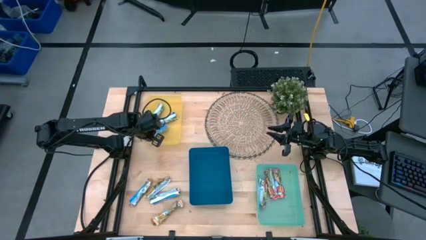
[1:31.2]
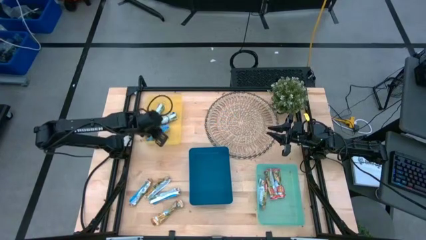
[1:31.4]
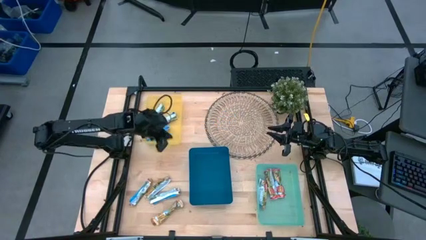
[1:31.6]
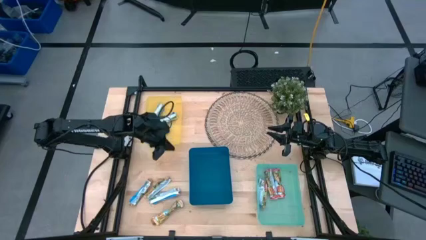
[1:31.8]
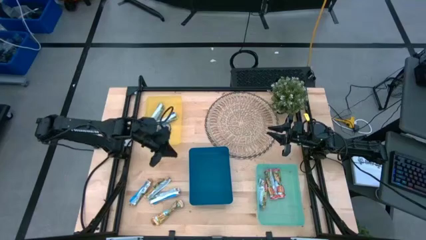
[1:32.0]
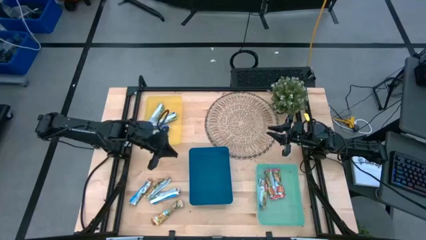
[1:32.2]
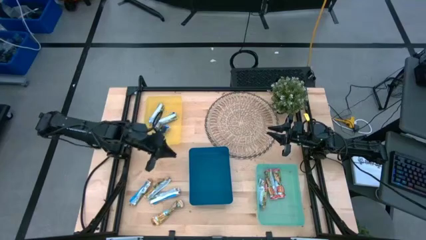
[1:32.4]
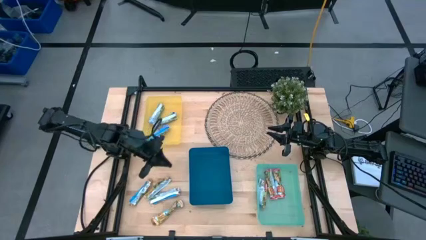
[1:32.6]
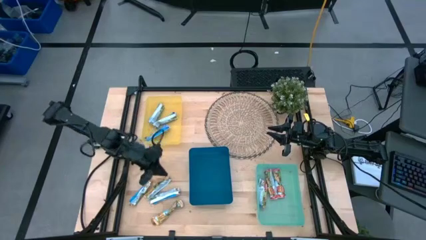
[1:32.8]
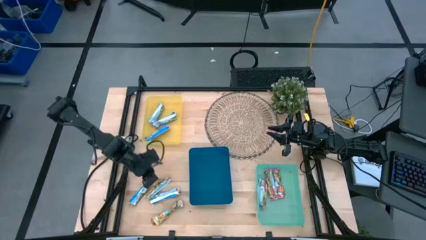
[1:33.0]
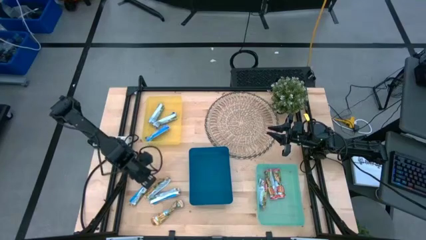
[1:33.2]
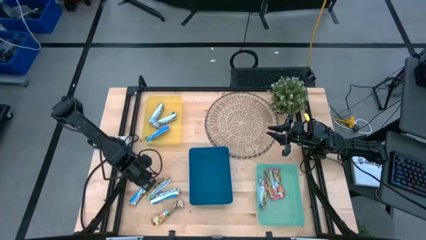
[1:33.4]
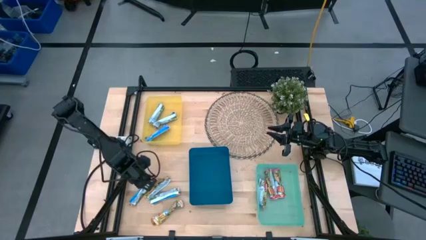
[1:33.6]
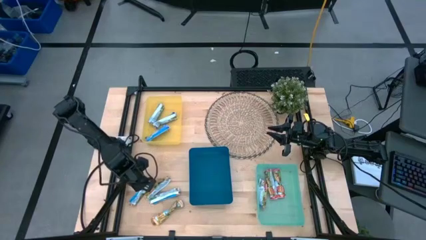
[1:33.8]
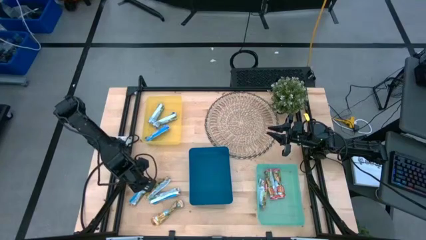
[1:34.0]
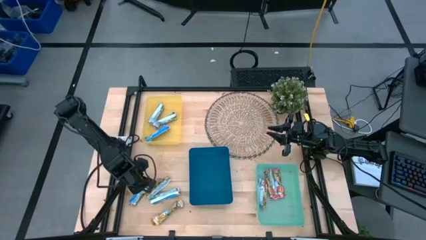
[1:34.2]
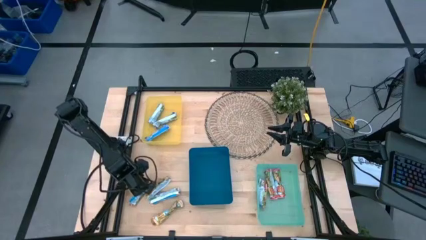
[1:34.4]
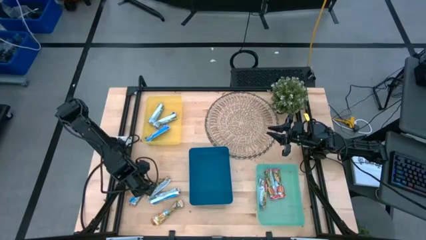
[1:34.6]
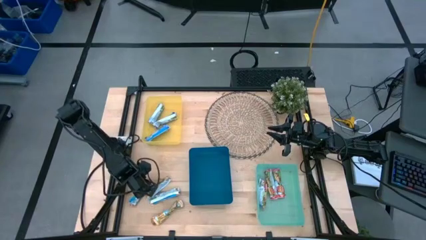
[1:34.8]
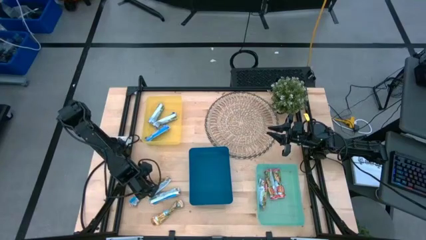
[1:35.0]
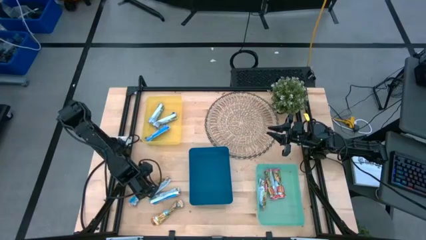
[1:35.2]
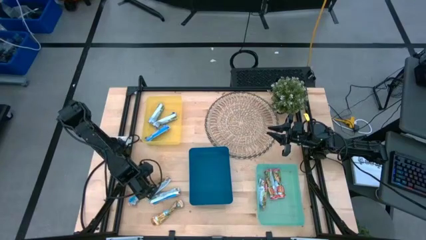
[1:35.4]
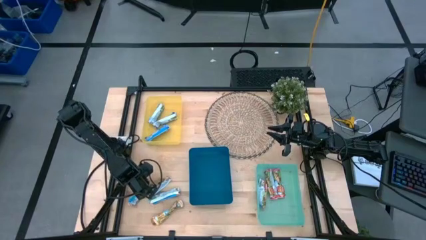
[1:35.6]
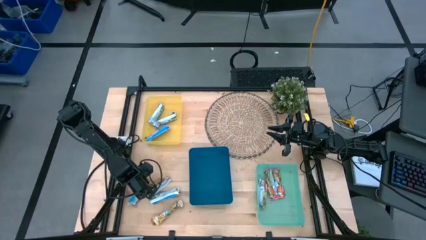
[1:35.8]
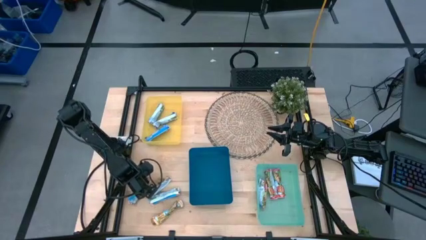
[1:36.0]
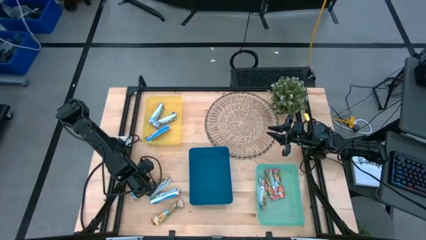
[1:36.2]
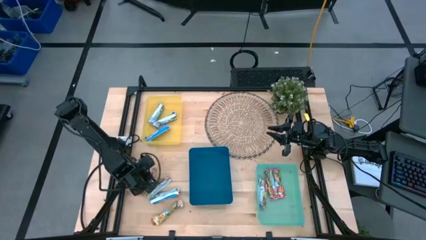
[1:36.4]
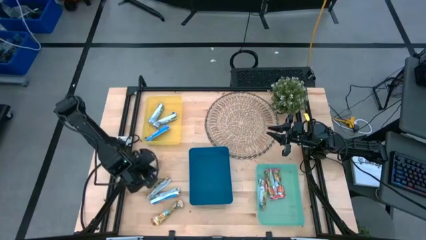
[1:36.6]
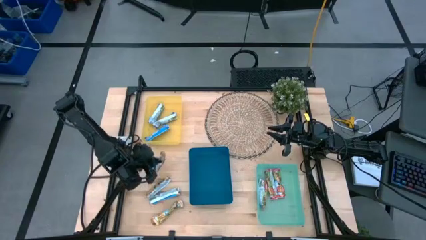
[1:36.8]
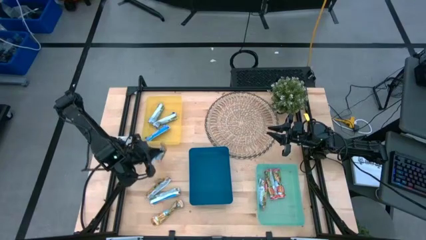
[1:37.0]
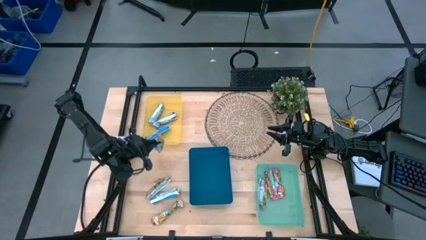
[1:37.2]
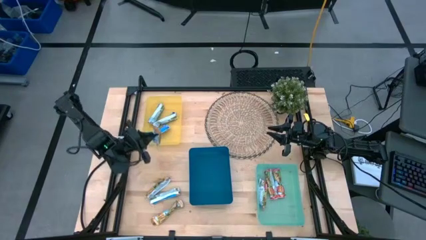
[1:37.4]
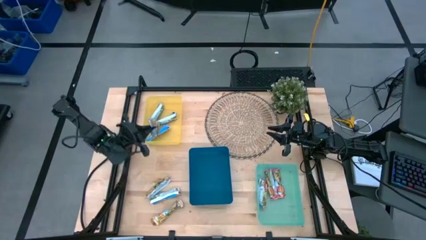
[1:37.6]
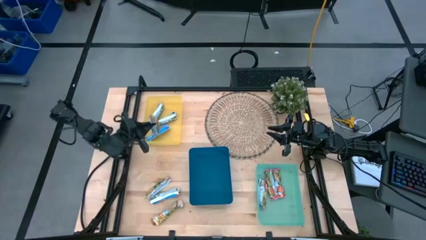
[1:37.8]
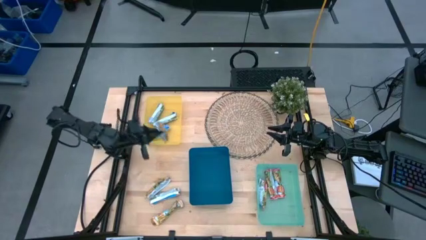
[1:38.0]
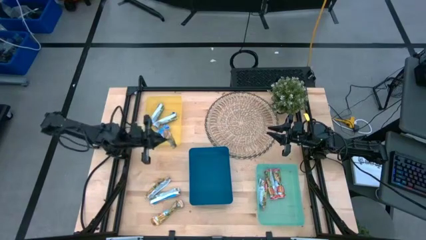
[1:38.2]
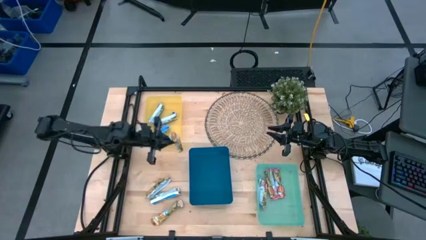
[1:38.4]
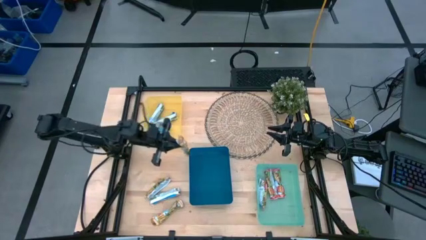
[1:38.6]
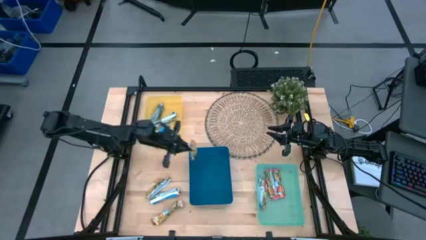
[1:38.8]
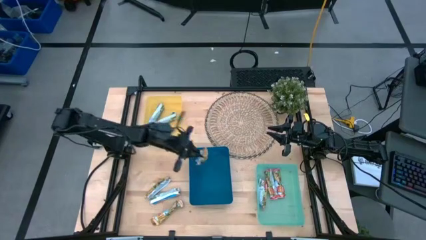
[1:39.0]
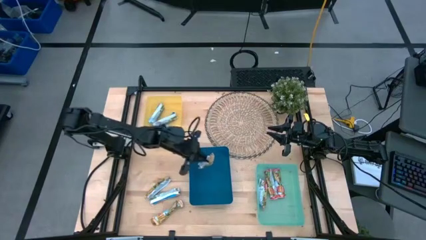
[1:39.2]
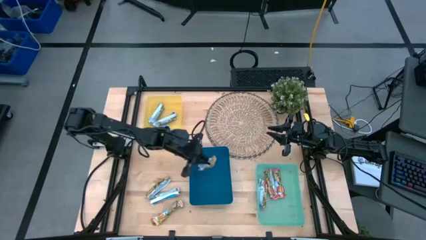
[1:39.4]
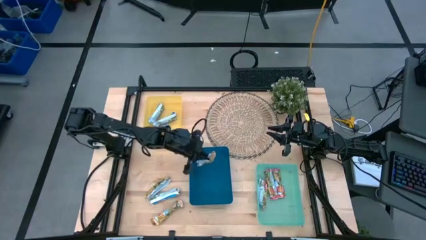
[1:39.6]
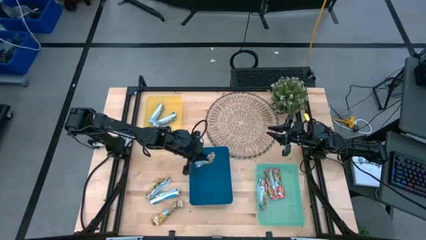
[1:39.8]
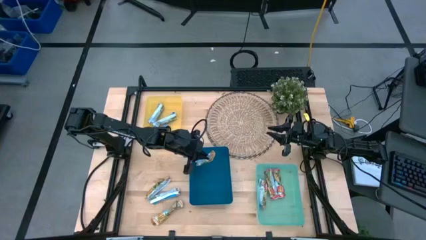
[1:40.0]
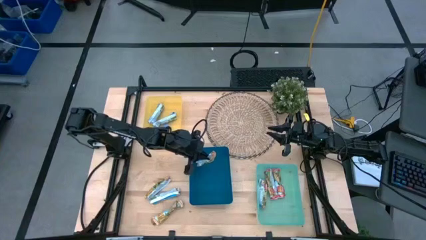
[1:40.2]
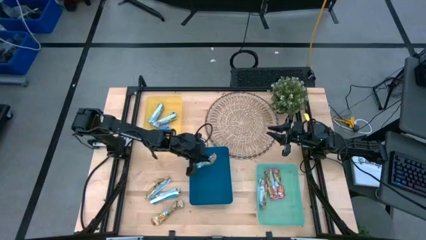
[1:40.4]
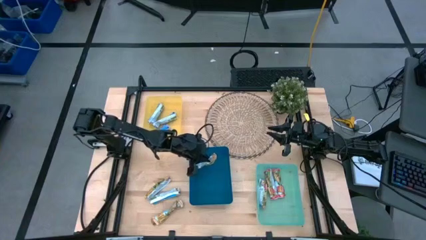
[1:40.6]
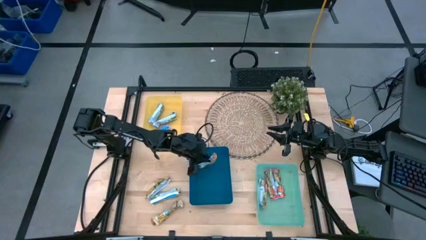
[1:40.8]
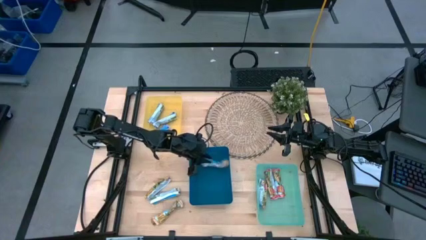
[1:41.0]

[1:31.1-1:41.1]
Task: Pick and place Granola Bars by type
Put the yellow granola bar into the blue bin

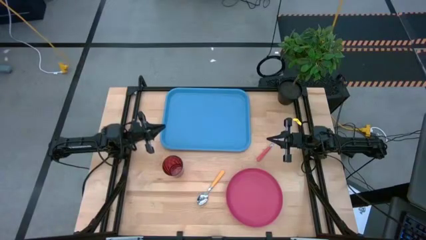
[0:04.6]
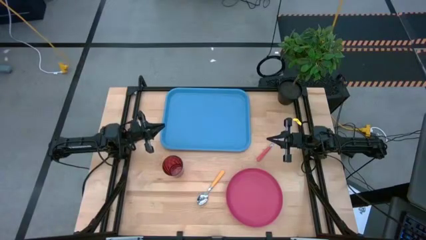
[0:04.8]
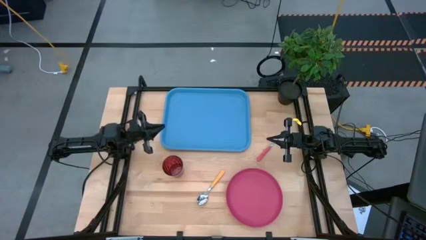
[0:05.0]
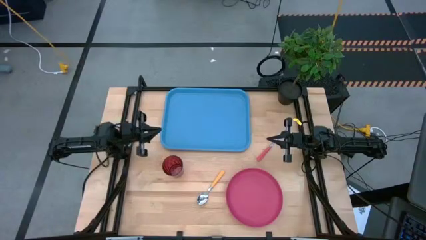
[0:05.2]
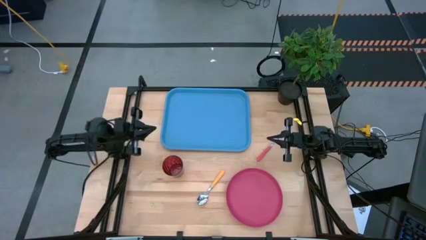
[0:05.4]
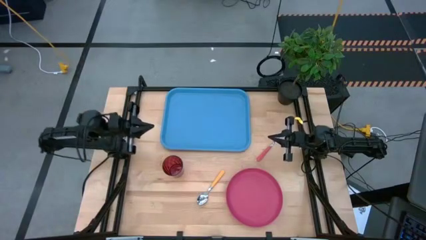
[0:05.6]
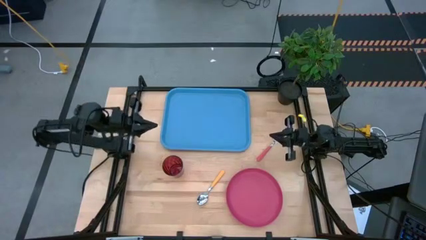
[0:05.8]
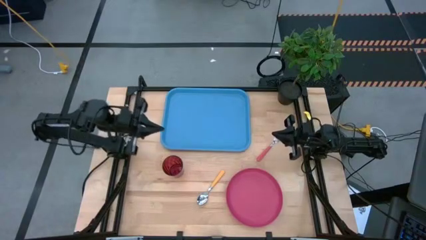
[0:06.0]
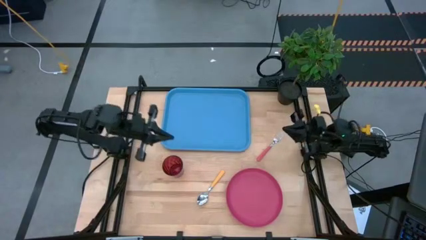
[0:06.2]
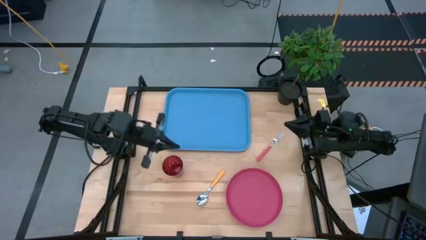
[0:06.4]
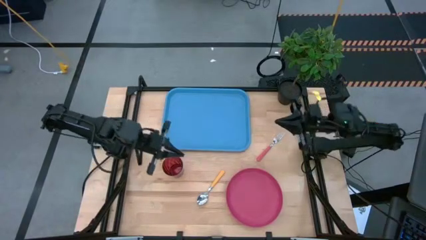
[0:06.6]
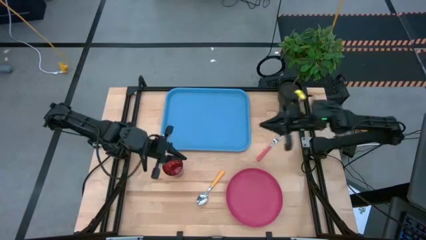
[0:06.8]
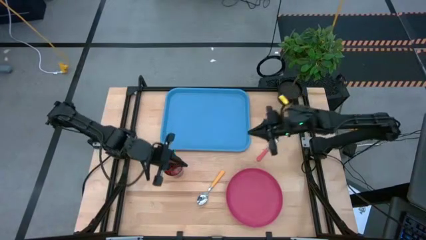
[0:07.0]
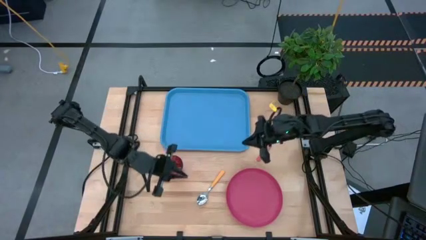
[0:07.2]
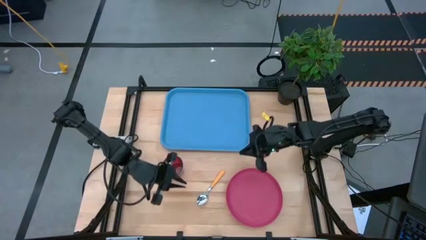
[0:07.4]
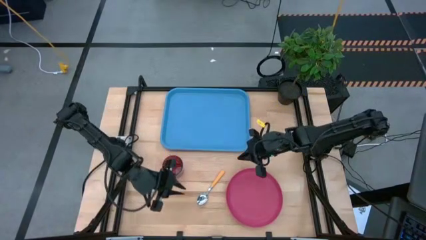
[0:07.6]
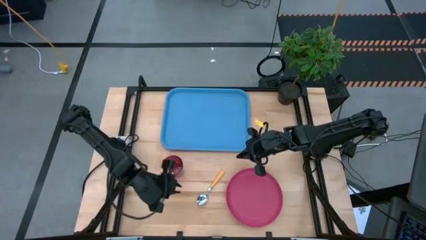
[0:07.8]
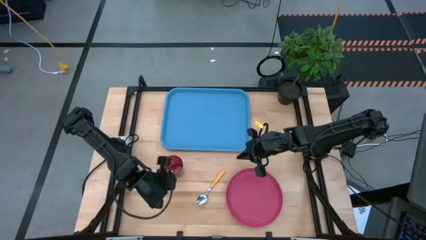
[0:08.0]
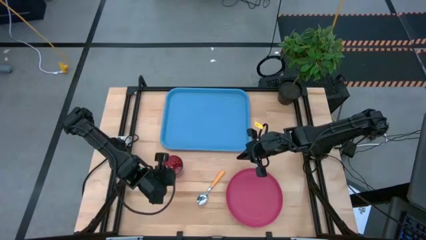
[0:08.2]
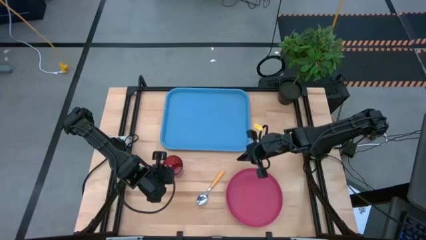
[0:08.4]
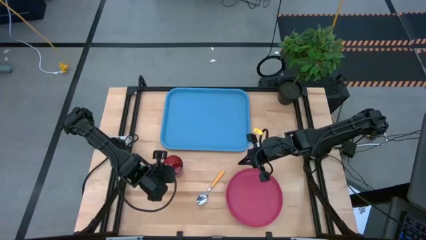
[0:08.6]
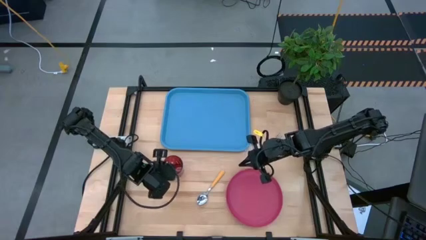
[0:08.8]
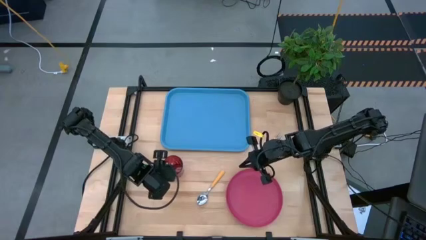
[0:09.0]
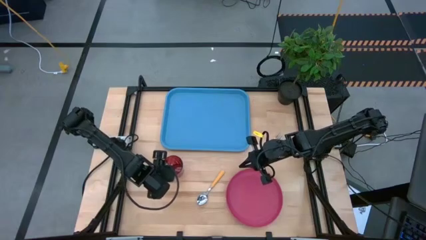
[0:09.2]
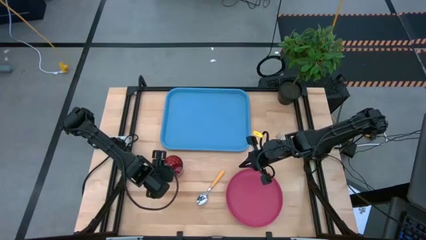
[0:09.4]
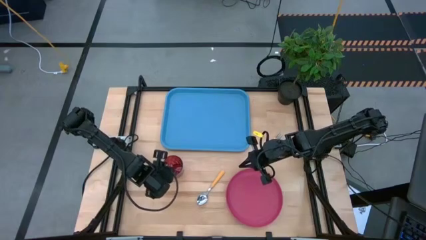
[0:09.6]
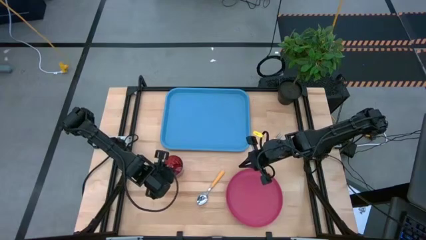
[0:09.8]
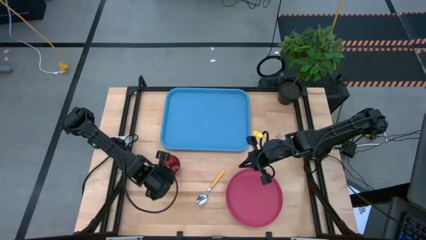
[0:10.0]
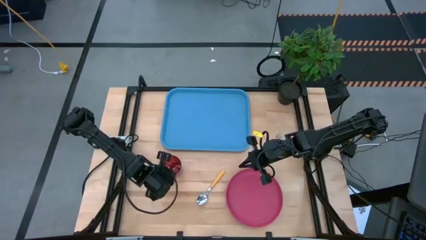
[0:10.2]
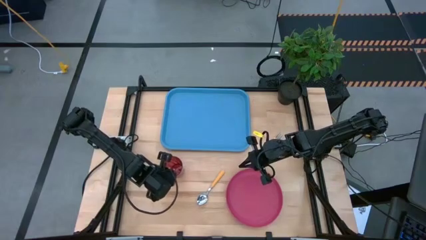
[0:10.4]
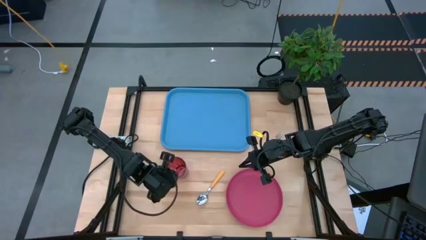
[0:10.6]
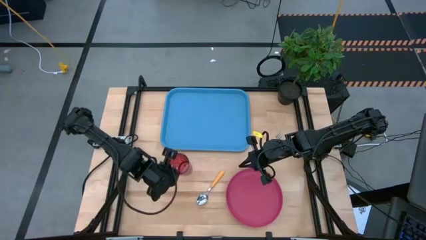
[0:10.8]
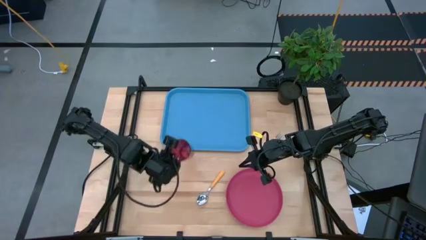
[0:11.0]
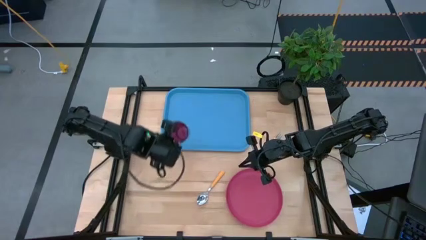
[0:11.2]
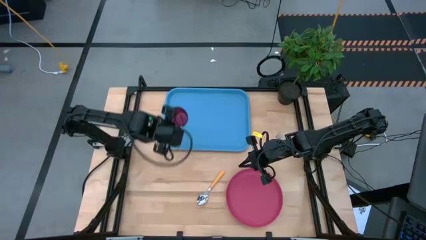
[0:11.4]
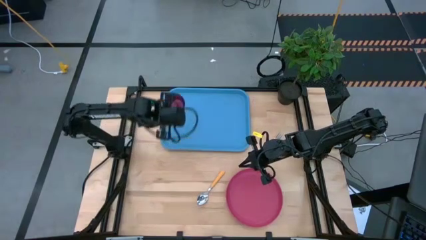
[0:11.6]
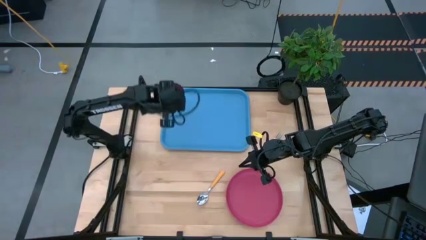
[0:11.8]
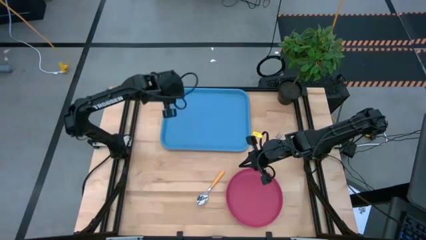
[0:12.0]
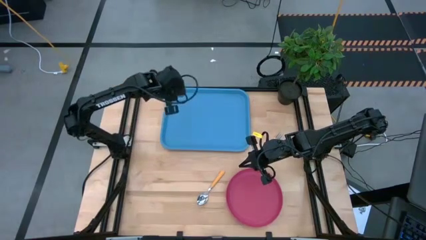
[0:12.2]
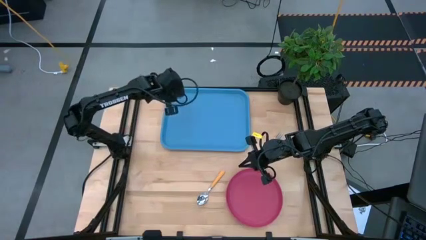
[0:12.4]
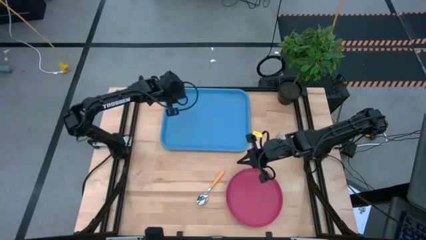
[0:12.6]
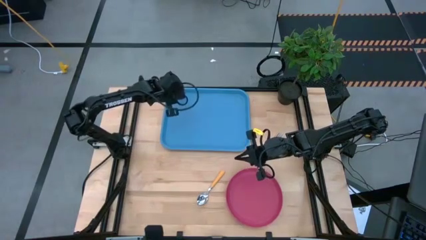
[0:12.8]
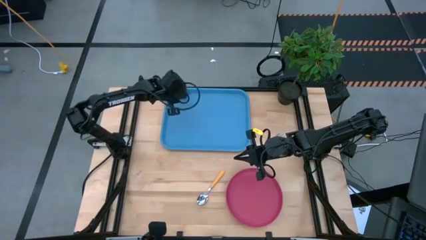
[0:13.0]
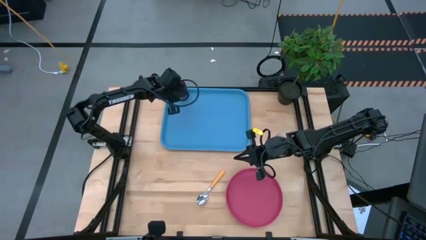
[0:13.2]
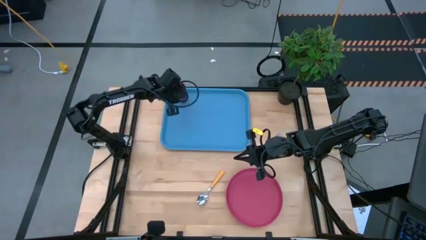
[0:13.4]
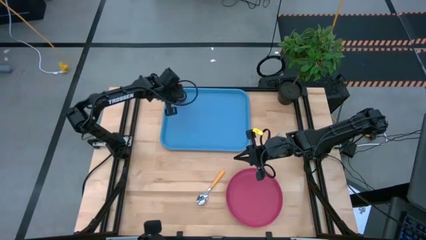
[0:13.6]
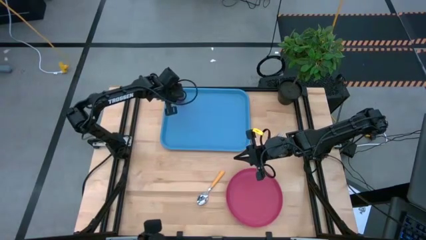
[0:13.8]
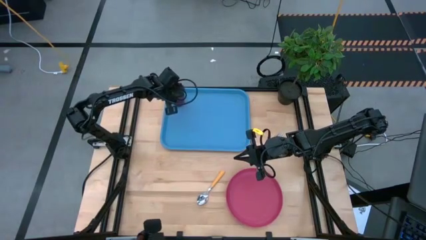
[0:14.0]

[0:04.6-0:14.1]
Task: Pick and place plate/cup/fork/spoon on tray
Put the red cup on the blue tray
